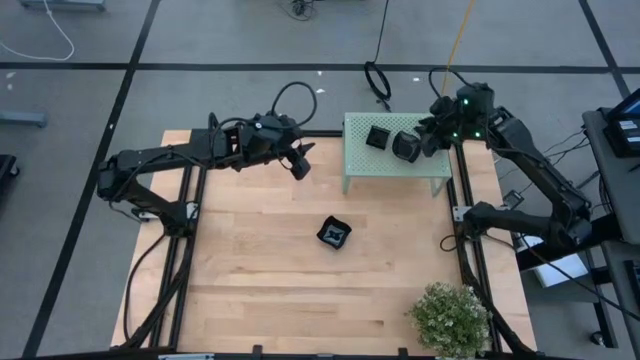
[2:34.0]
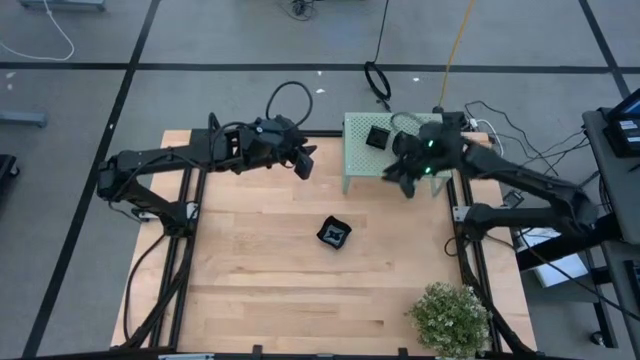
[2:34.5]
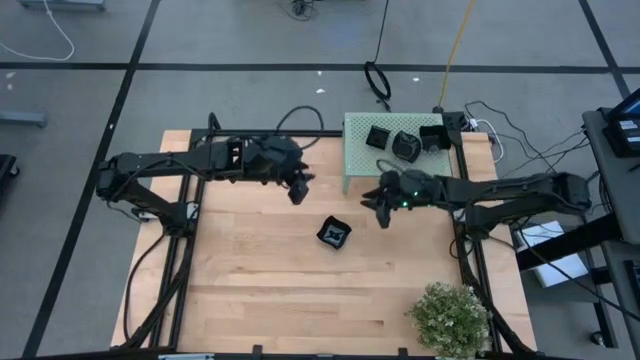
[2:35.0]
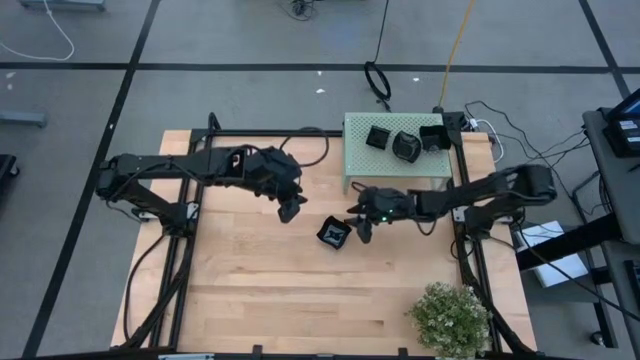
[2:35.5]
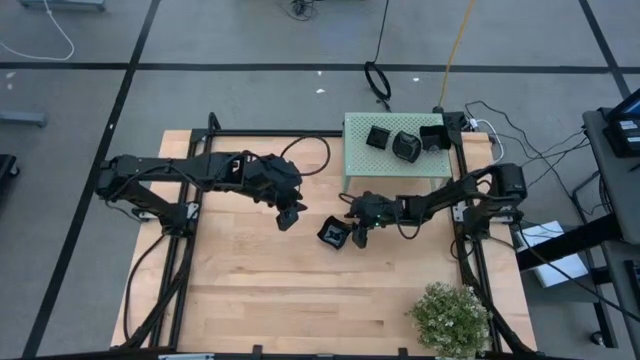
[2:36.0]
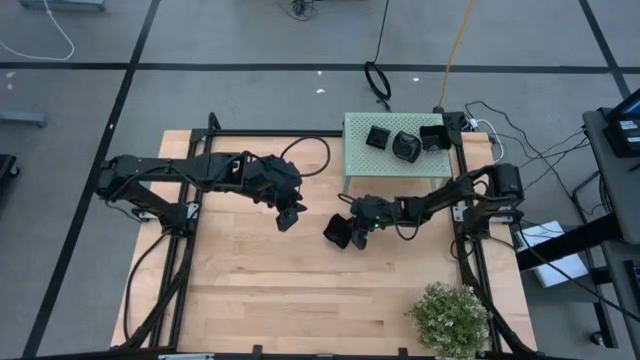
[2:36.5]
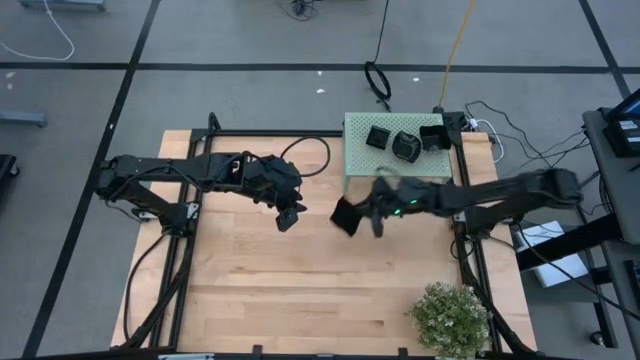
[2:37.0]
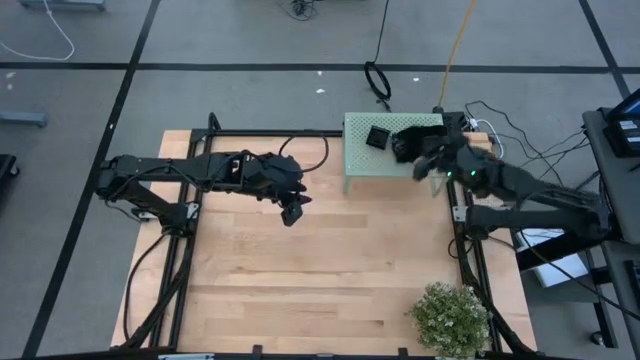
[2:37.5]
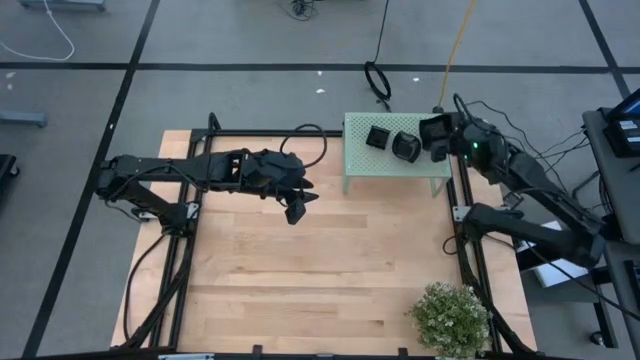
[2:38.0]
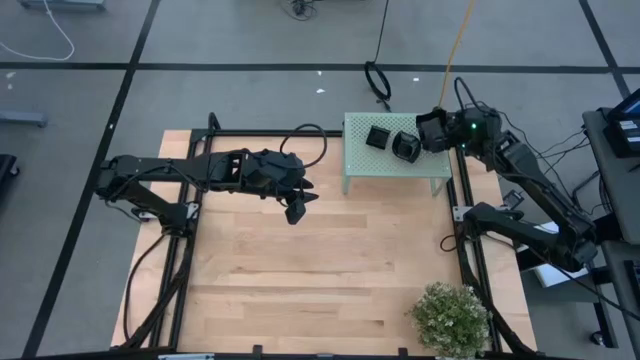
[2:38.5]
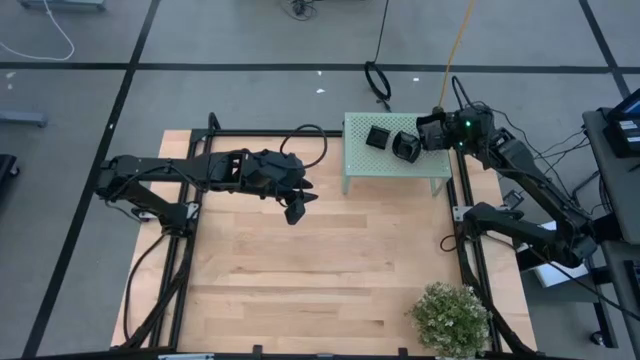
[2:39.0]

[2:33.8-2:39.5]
Task: Pick & Place Mini shaped plates
Stack the distorted square plate on top of the distorted square plate on the shelf

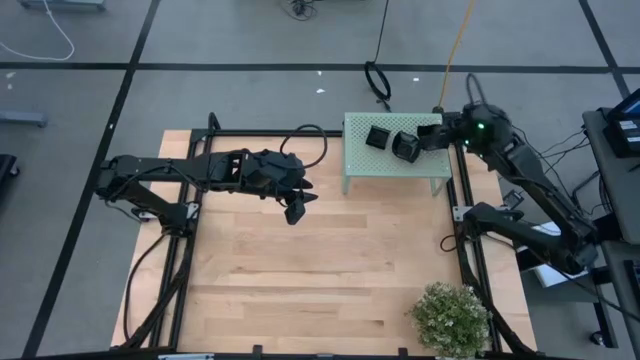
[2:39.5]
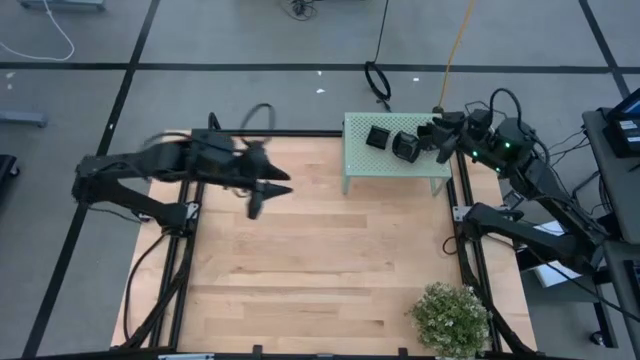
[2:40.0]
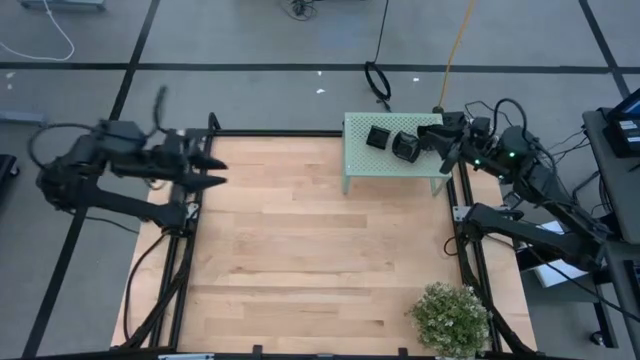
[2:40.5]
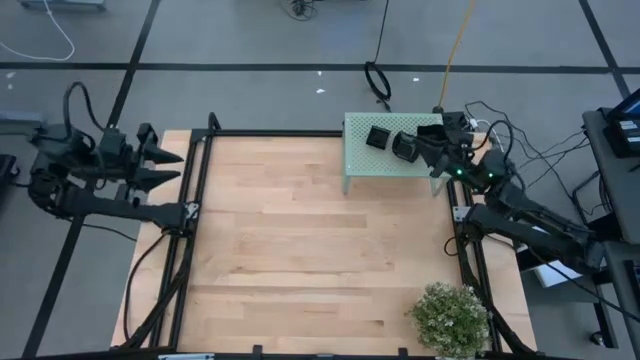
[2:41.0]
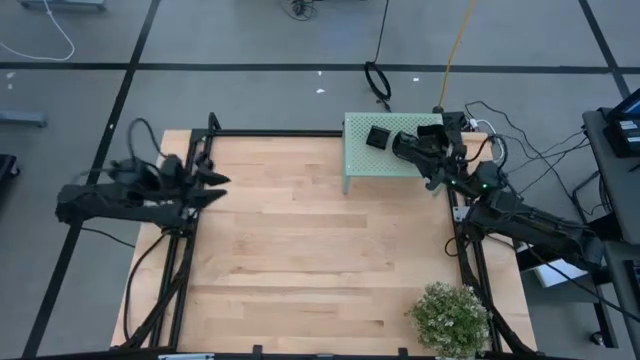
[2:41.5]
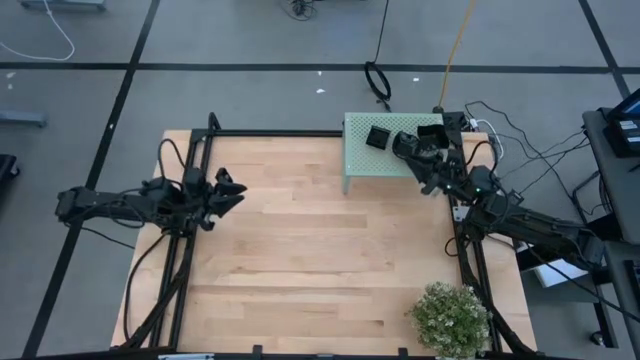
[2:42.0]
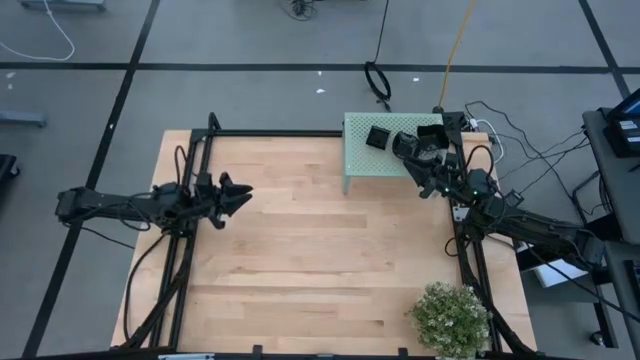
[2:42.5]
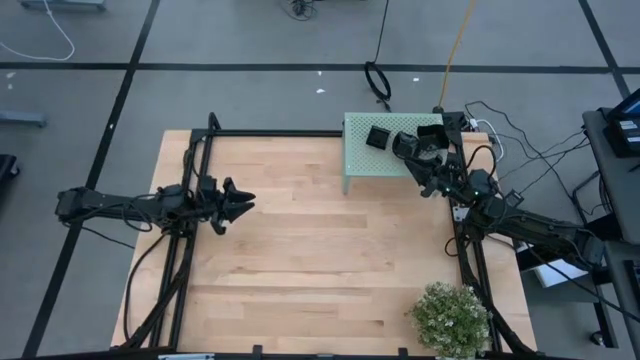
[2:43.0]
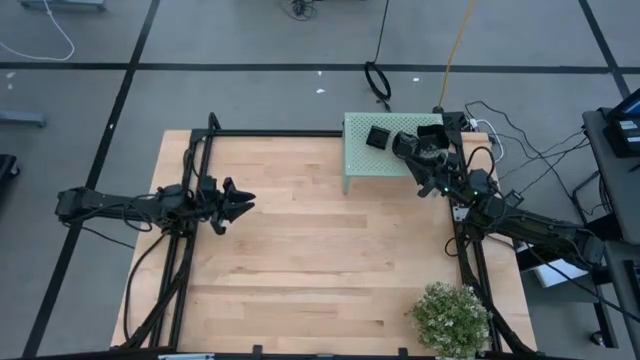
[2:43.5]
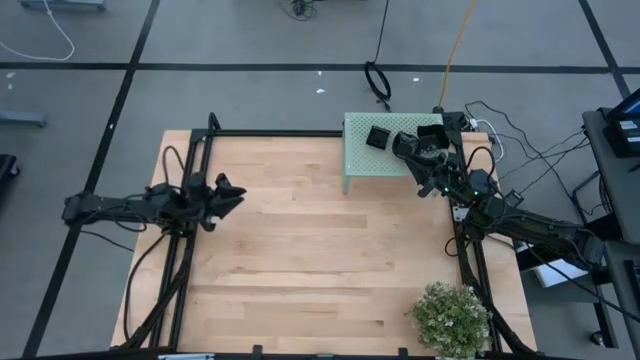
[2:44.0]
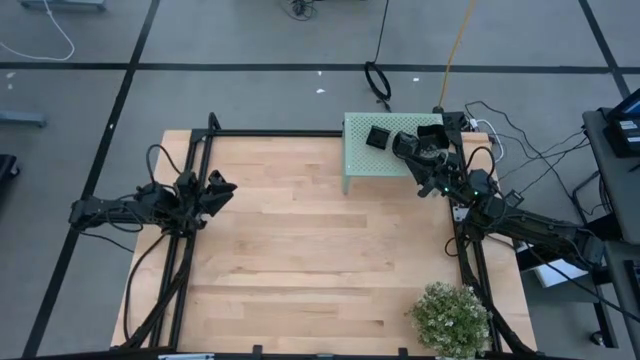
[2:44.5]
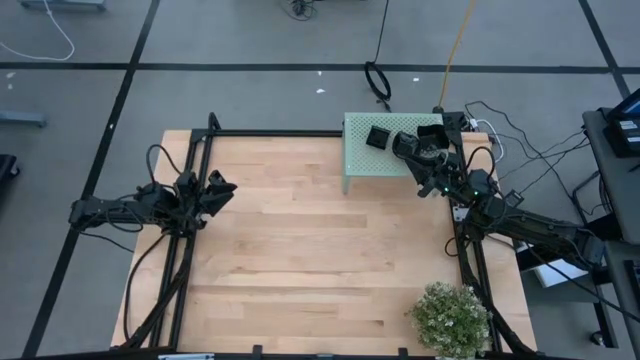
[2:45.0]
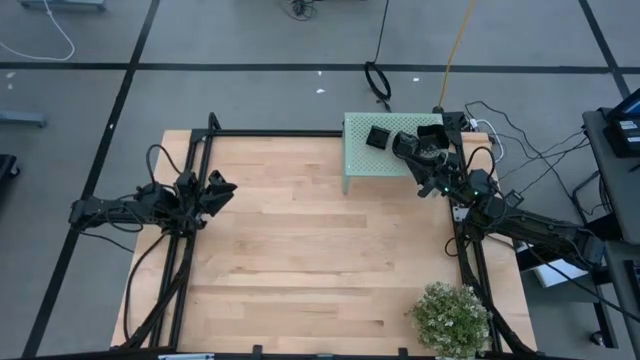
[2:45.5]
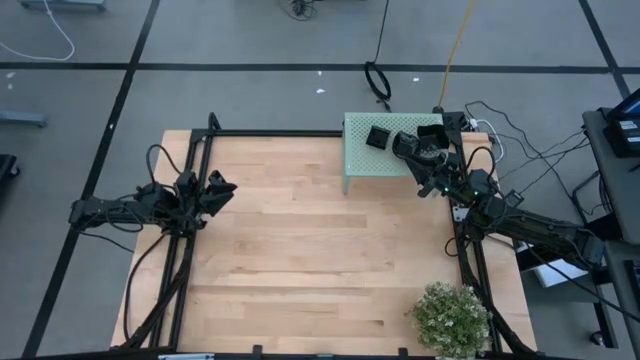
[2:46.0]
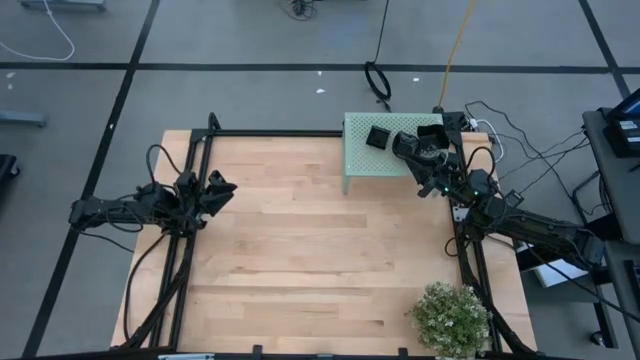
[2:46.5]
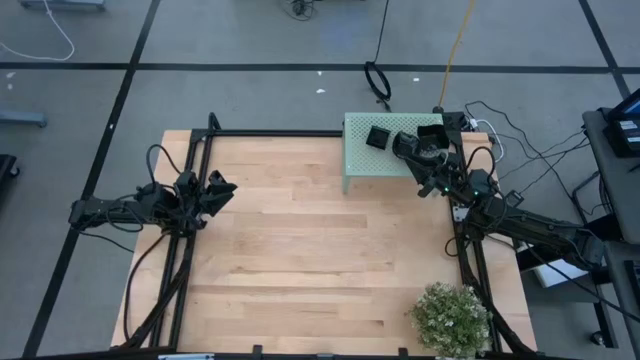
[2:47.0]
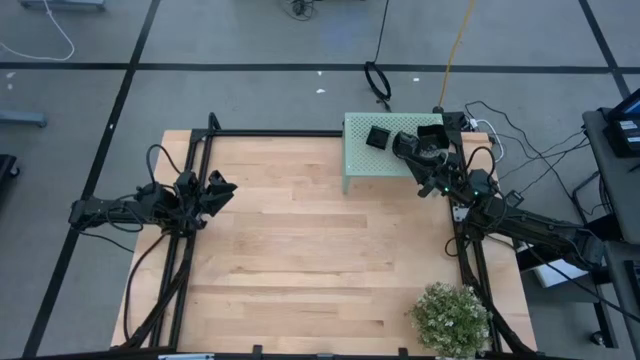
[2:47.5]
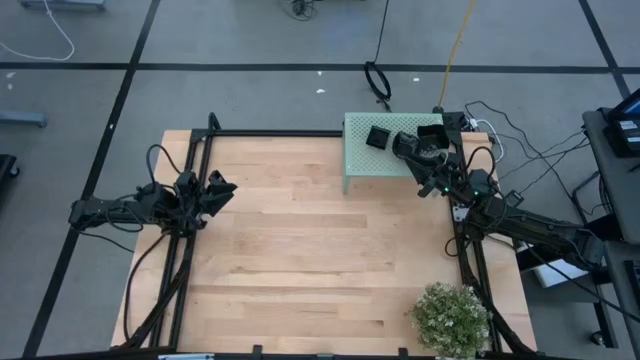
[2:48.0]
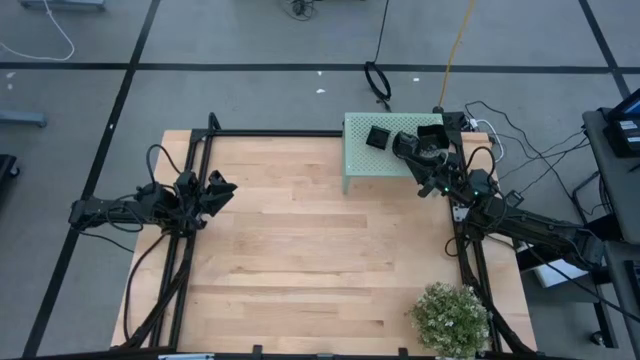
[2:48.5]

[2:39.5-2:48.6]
Return to Home Position

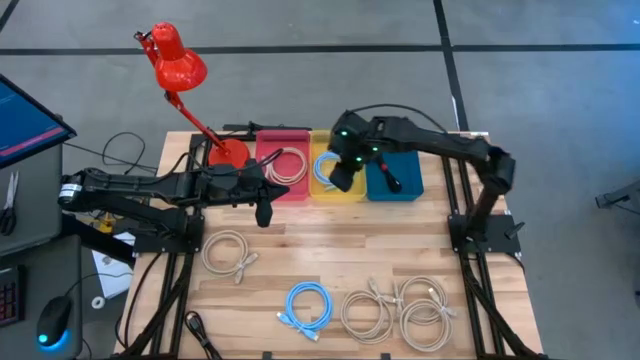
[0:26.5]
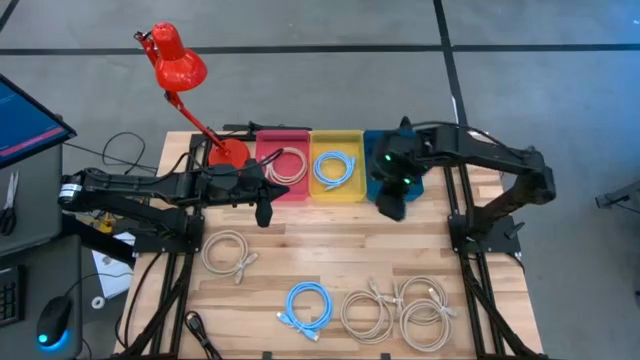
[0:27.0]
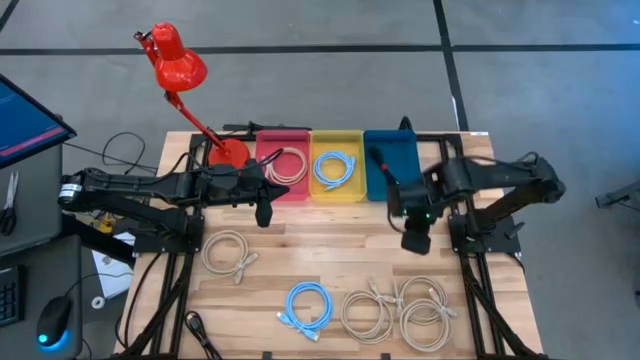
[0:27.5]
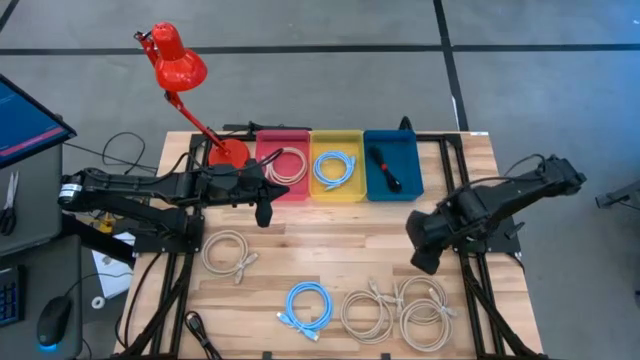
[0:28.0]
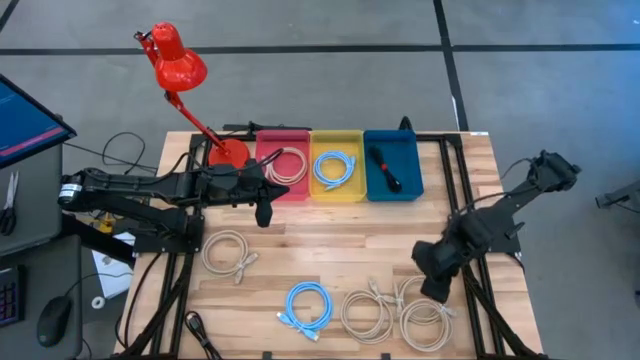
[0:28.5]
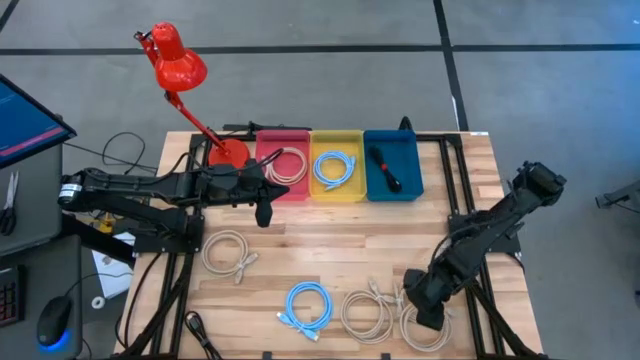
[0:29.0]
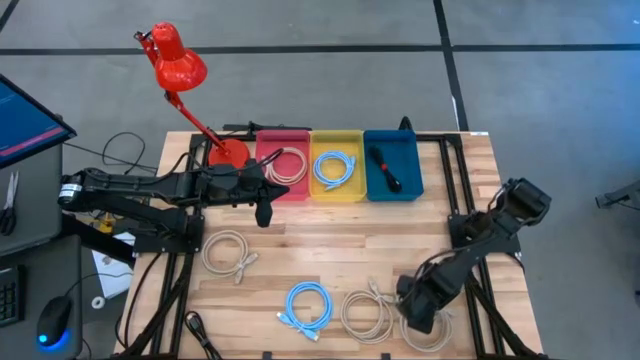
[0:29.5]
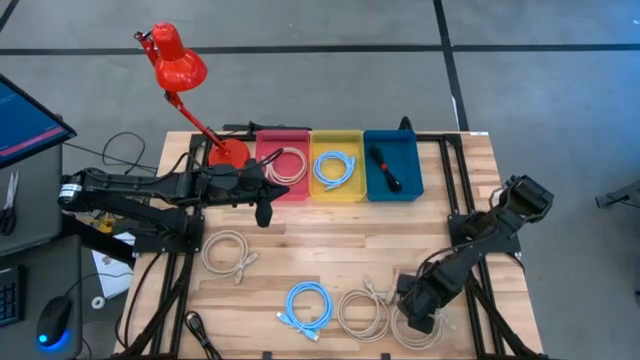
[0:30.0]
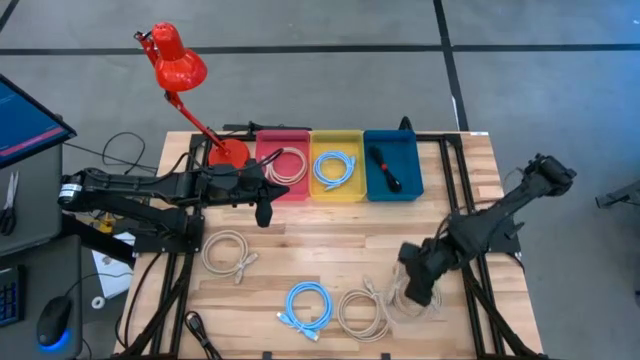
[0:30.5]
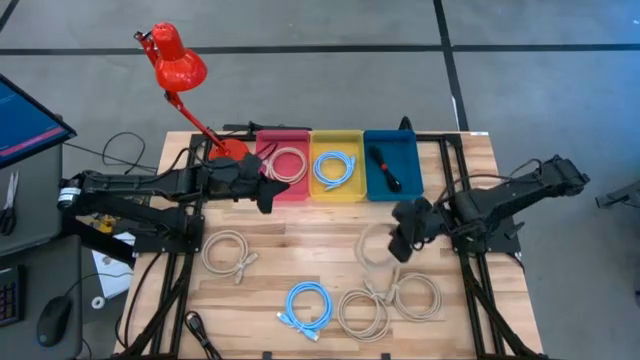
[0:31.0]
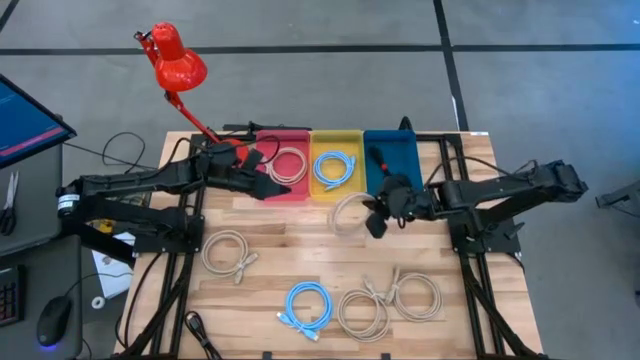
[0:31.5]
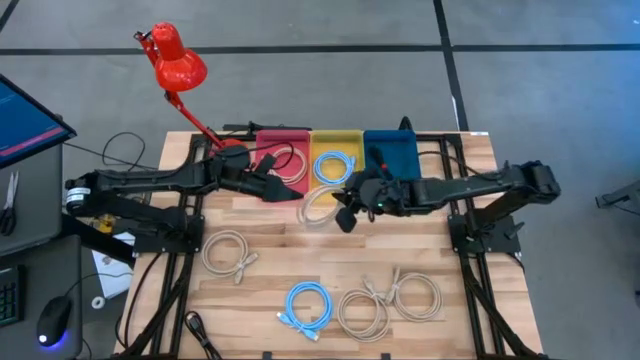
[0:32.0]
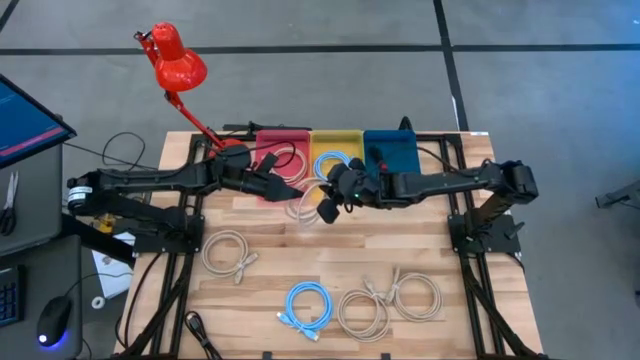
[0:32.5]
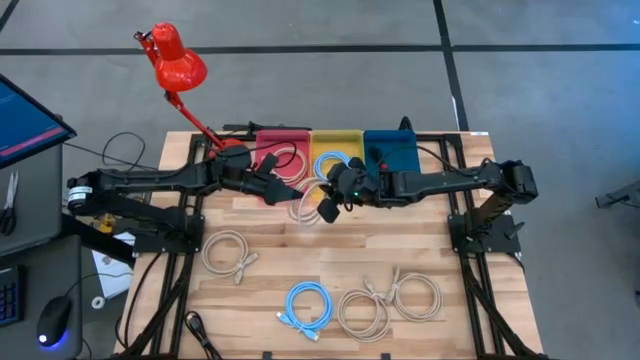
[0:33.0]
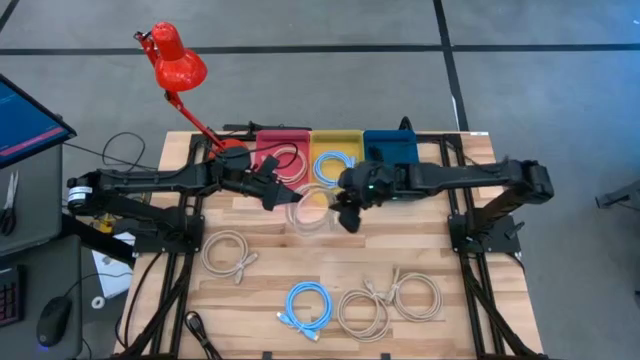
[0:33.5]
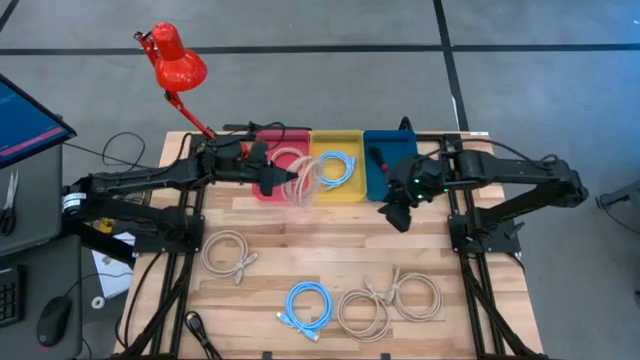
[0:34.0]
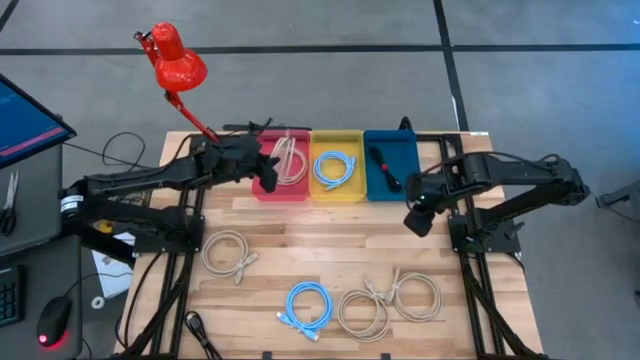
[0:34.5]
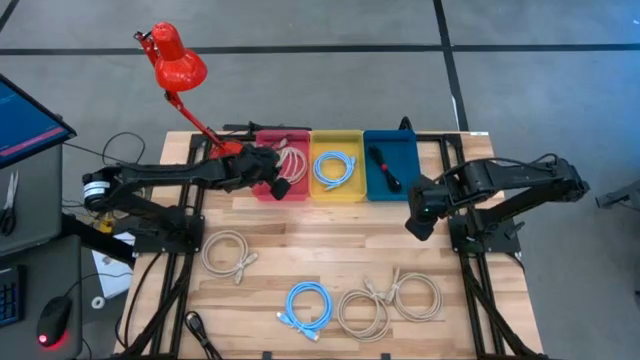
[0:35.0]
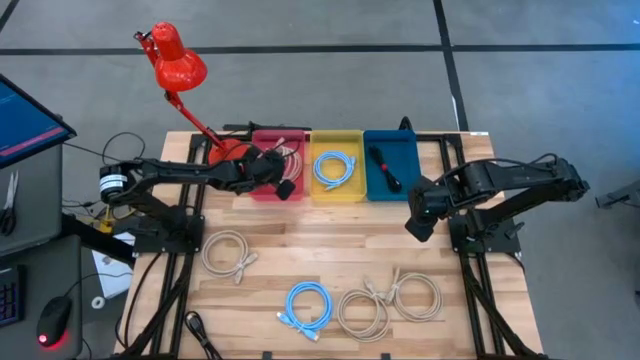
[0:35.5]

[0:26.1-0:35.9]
Task: Pick & Place USB Port
Put the brown charger cable into the red bin
